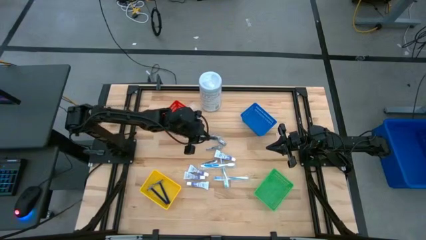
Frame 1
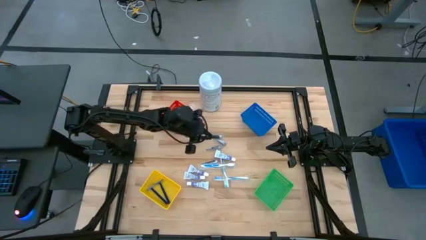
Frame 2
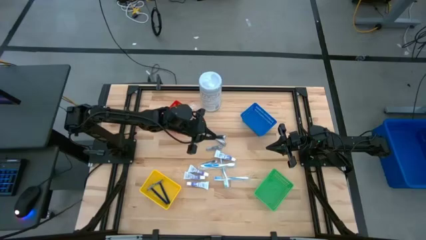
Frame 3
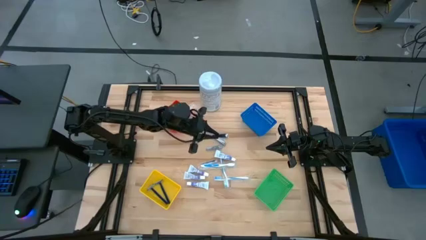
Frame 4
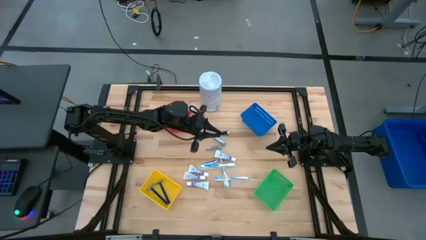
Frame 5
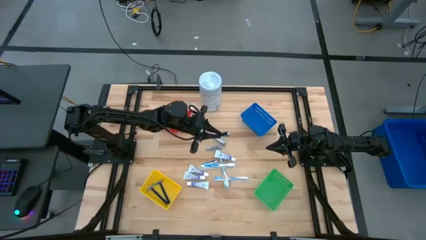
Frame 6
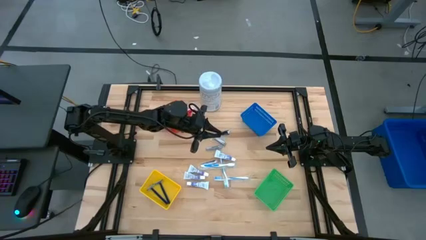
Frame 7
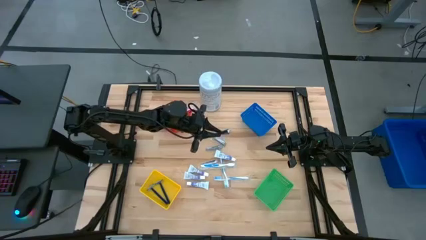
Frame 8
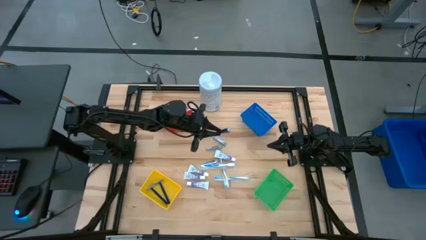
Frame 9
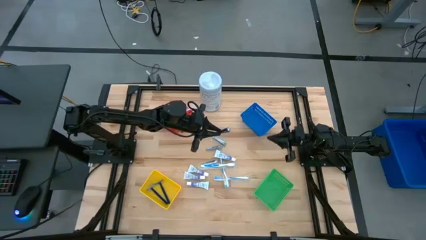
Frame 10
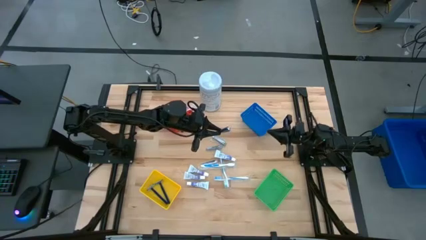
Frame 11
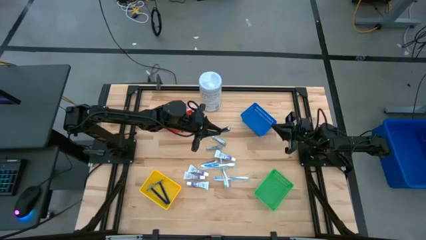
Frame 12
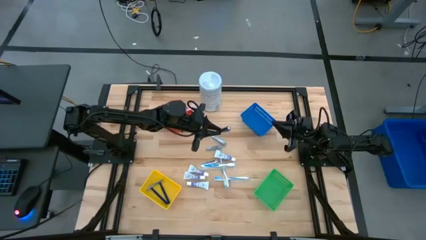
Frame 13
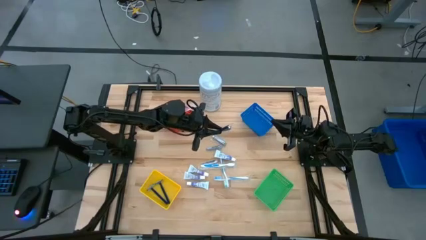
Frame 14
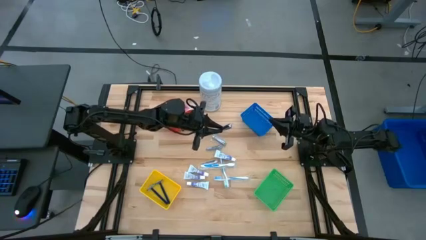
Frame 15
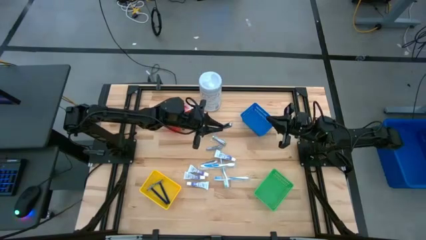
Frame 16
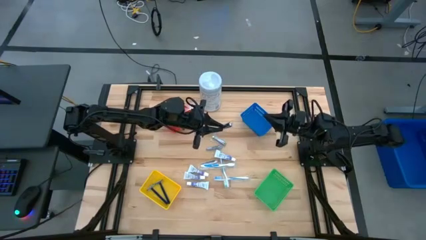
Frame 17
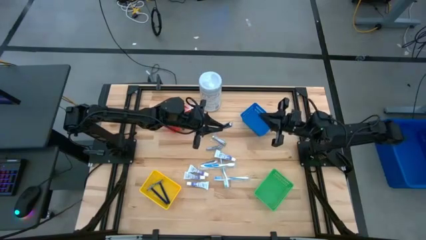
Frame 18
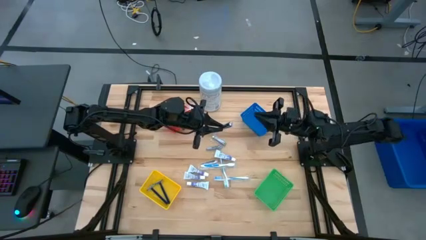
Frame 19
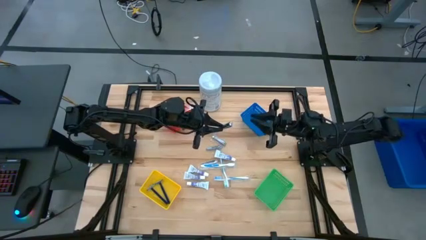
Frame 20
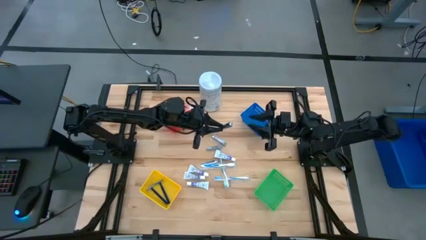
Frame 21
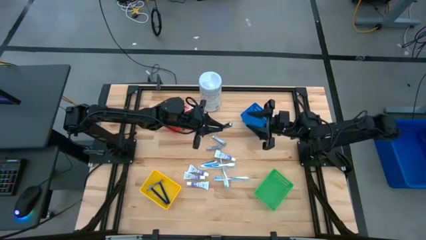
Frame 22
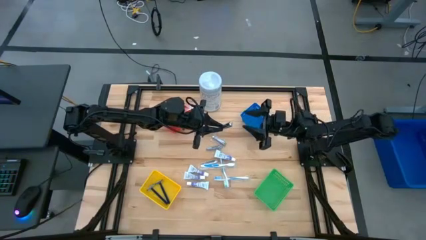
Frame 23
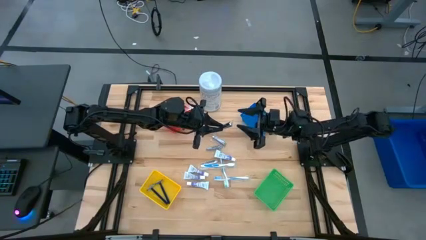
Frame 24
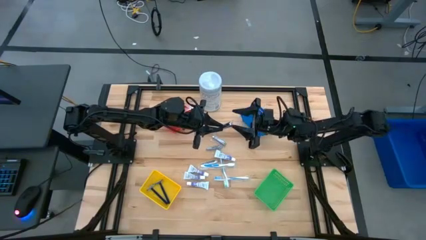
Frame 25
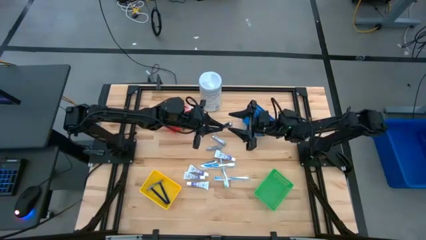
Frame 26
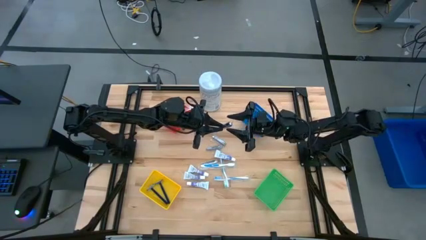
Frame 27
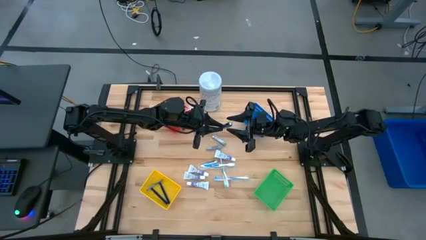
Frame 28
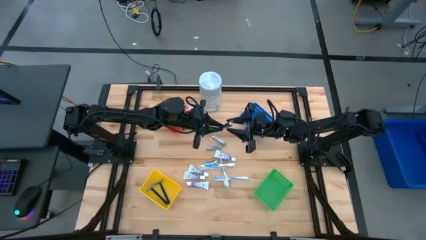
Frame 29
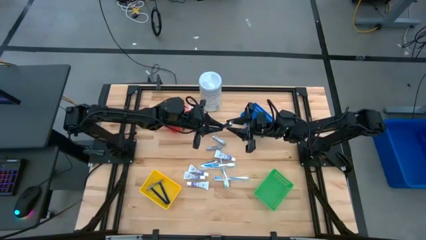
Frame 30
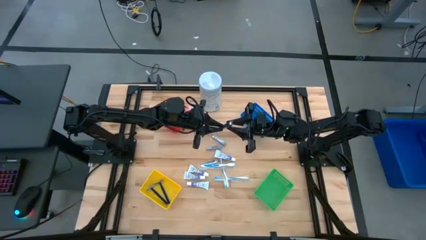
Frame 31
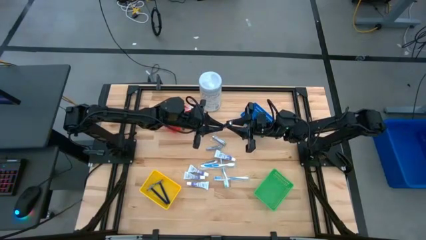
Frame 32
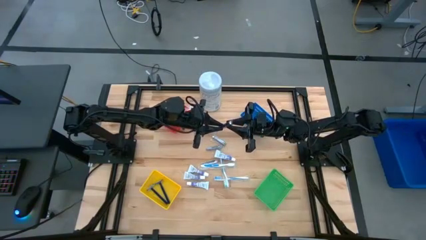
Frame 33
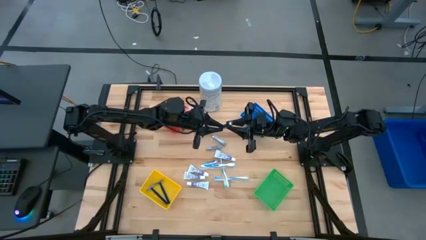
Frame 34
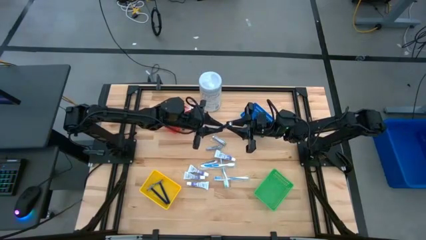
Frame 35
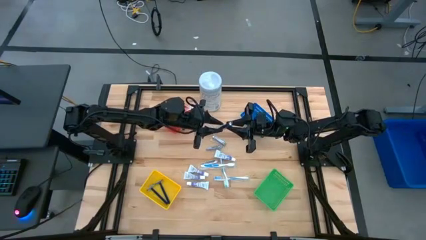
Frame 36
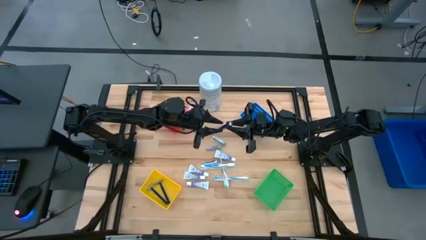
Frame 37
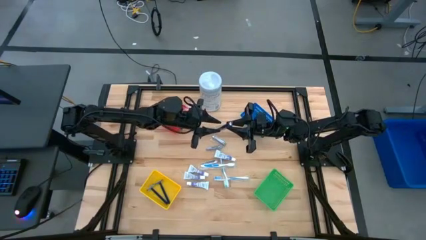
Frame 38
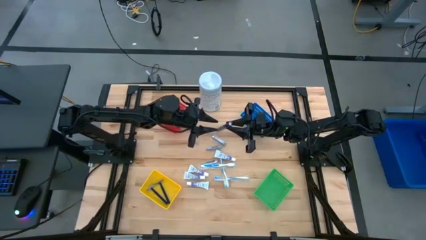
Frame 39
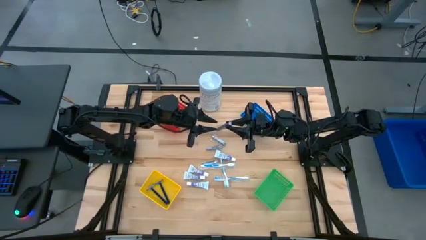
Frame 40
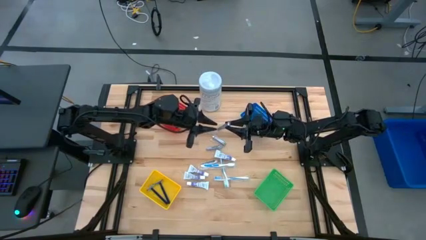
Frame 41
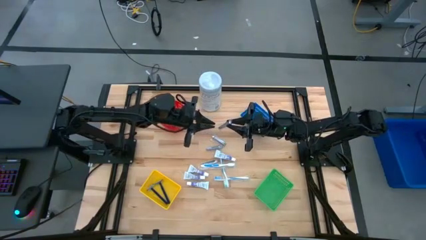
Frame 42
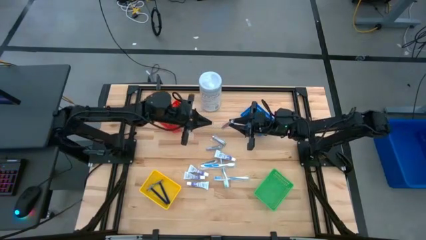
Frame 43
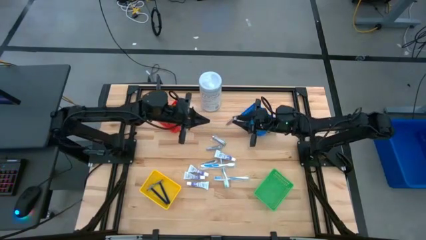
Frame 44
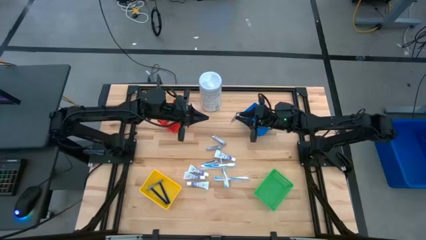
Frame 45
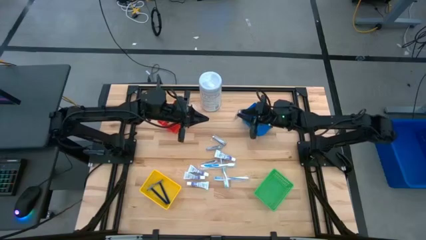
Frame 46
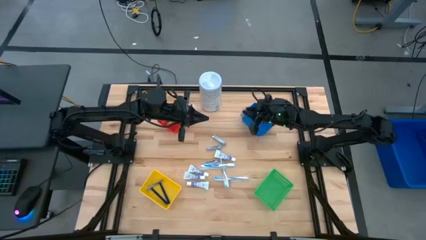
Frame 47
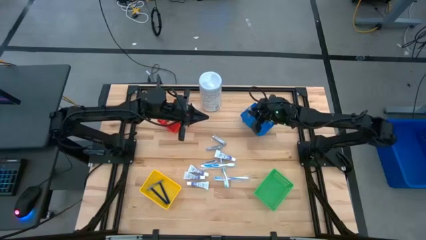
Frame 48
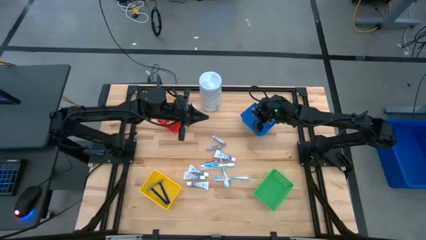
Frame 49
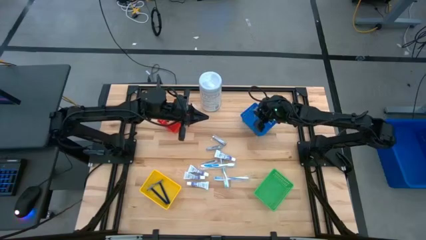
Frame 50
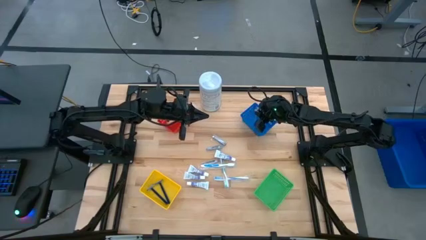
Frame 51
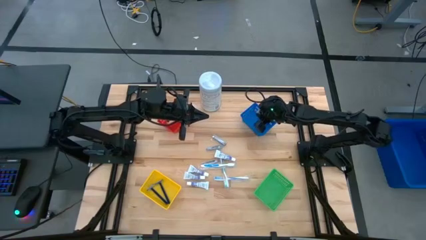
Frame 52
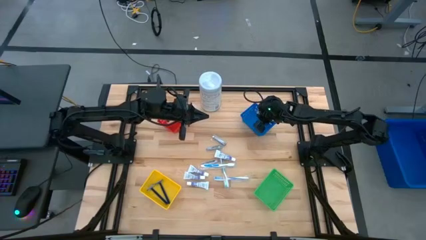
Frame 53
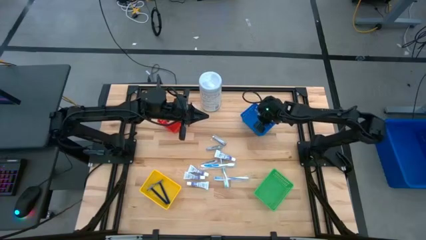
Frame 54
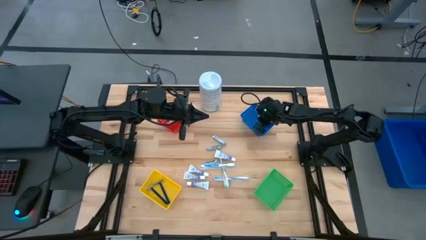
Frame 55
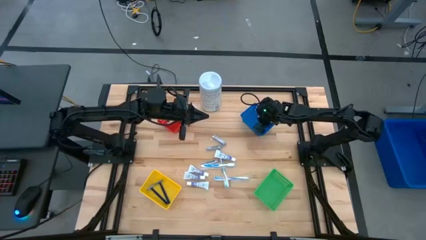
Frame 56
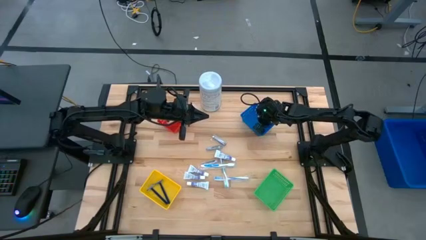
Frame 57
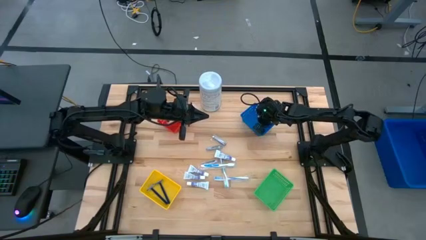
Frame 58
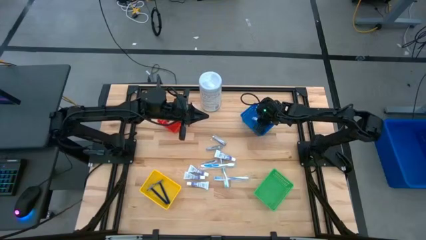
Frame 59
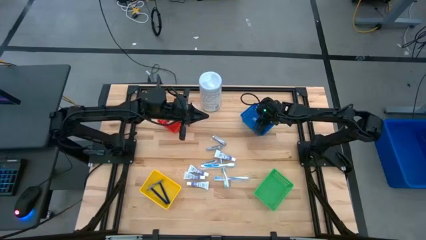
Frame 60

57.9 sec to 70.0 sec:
Task: Pick & Place Travel size toiletries
Put the silver nail clipper into the blue basket
